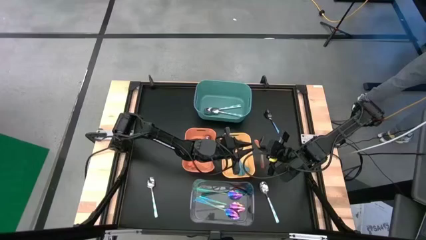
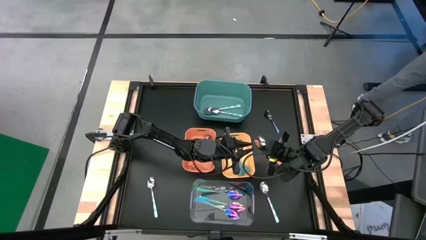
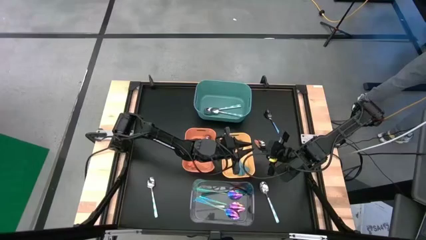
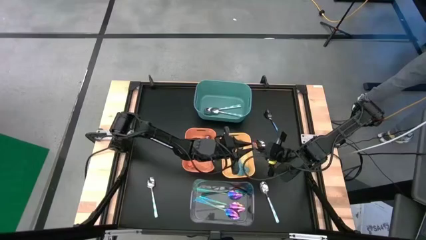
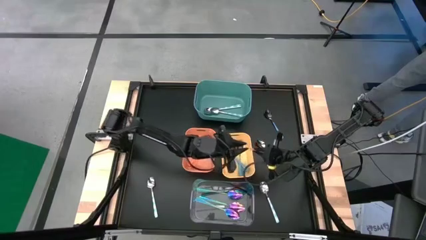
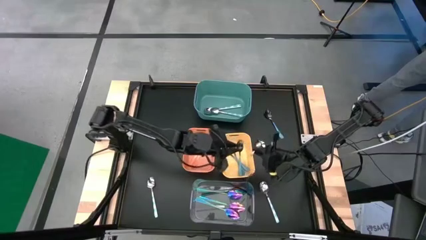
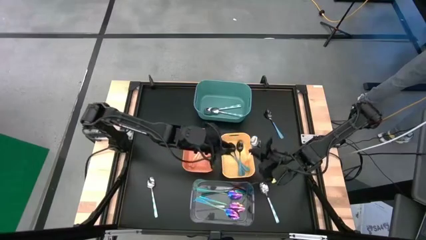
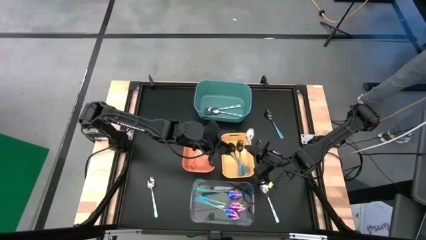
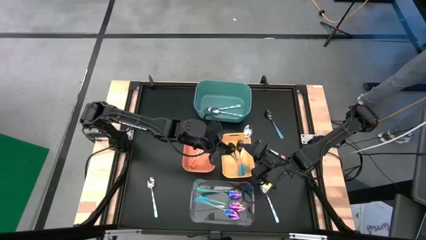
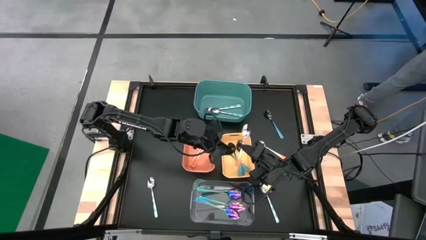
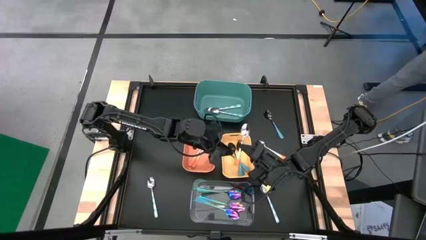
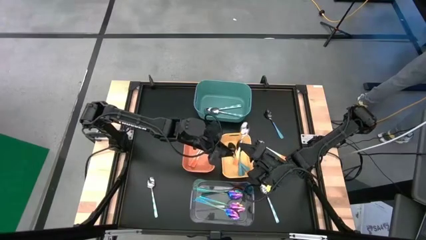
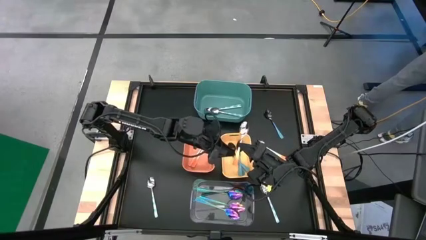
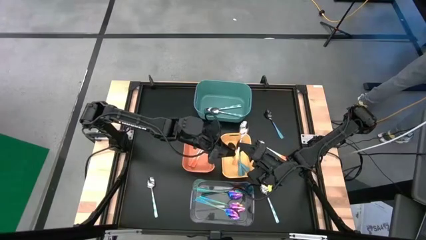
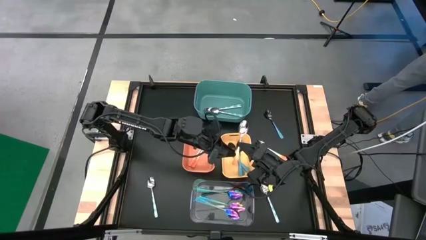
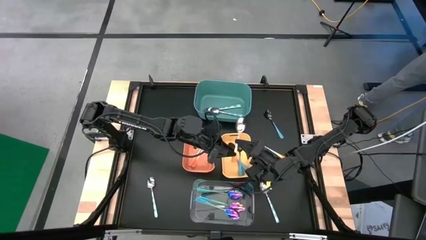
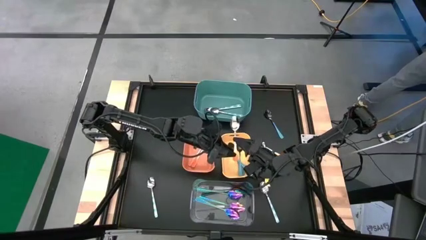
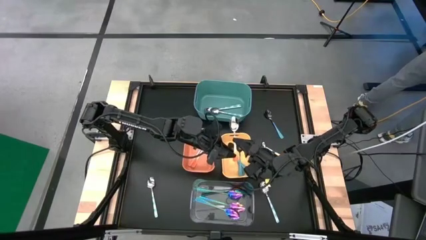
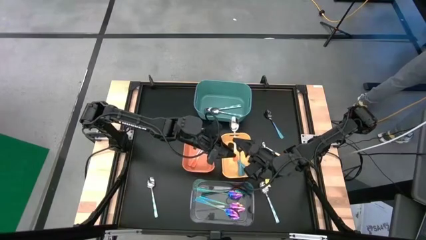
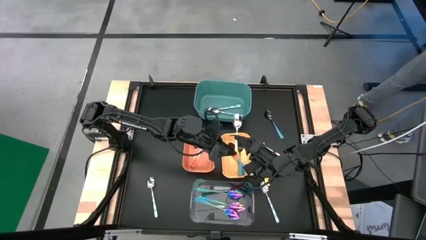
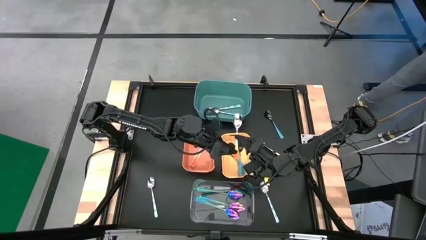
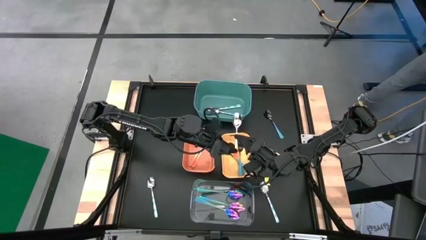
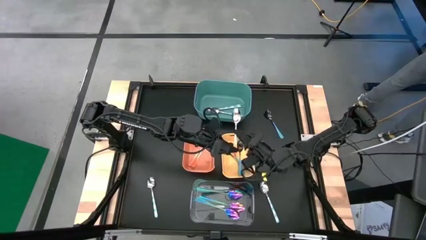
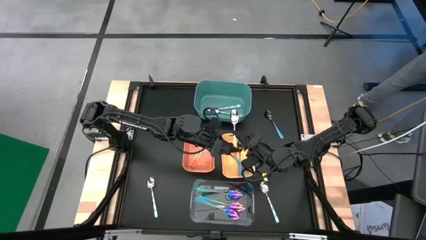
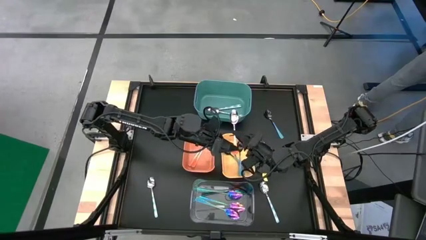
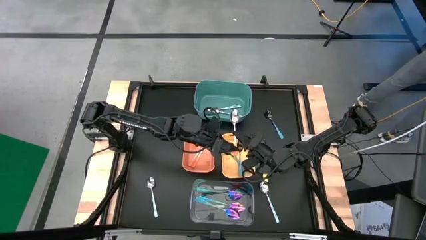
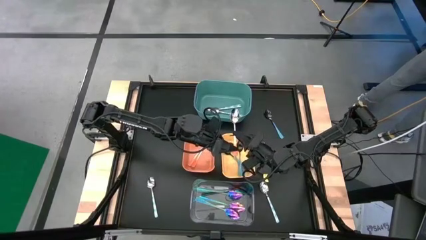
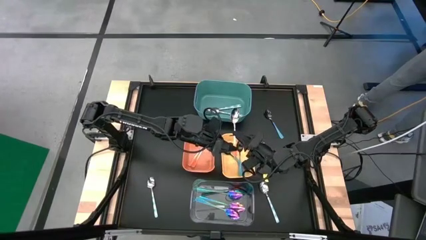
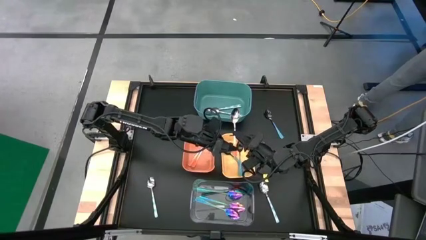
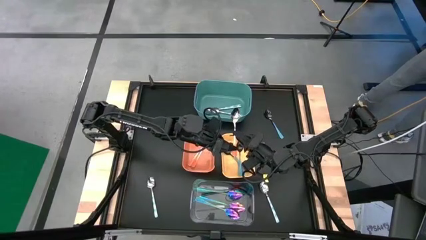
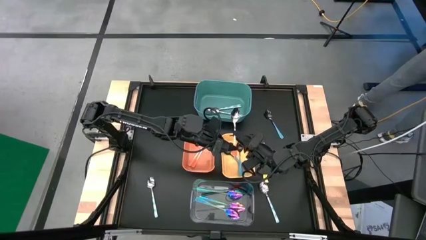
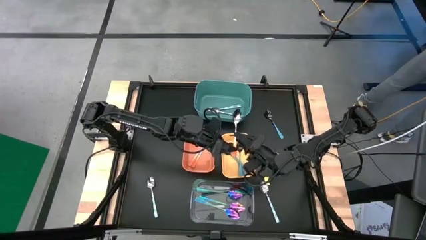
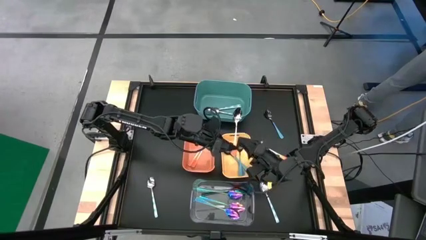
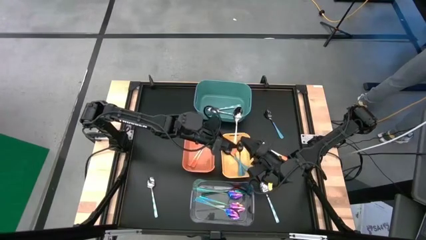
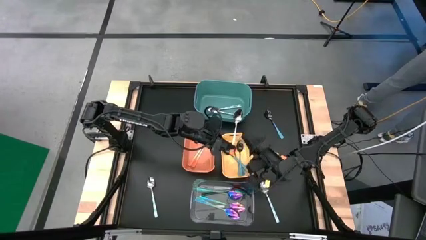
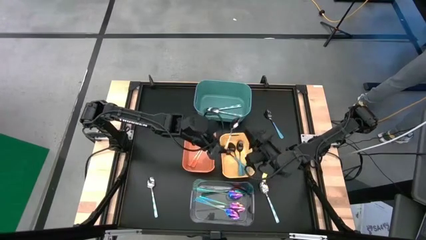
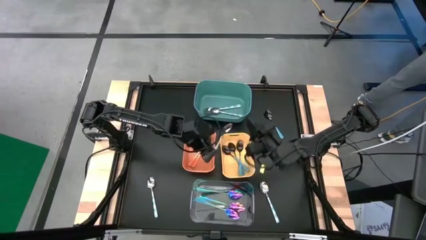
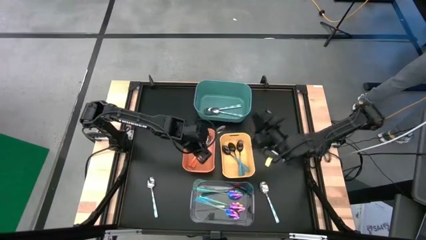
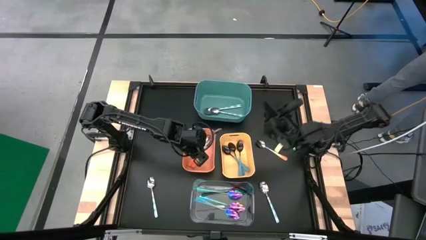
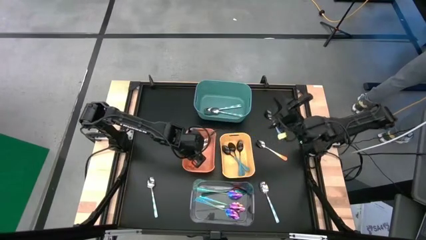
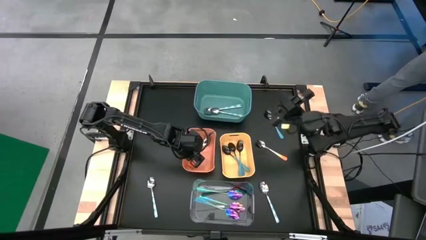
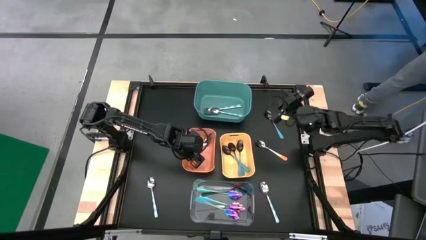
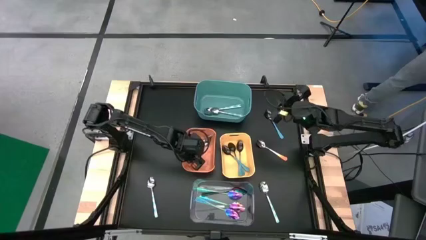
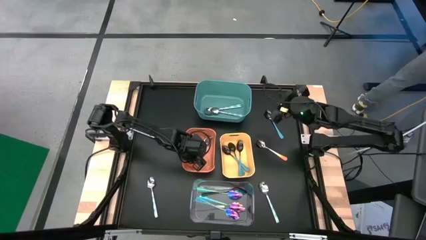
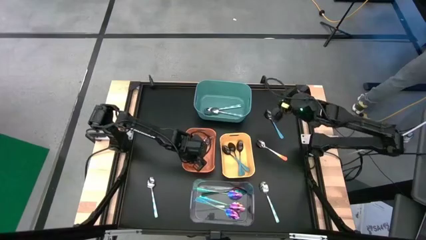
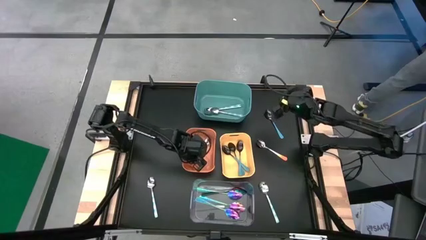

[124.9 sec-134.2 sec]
Task: Sort silverware by color (type)
Put the orange spoon into the orange bin

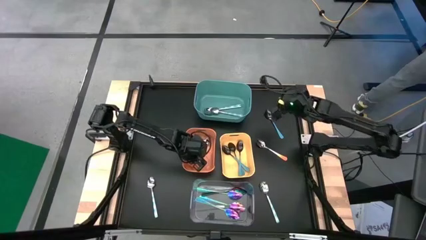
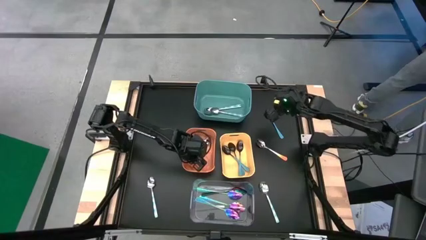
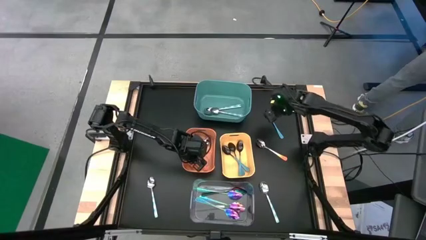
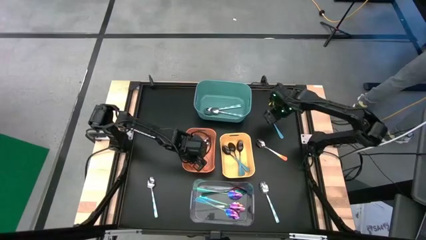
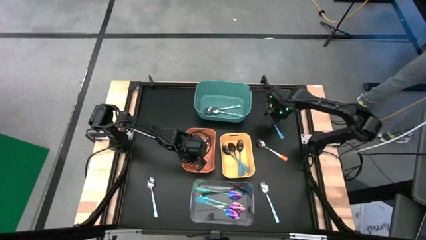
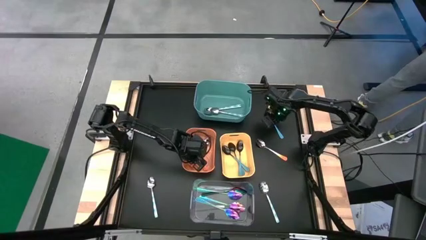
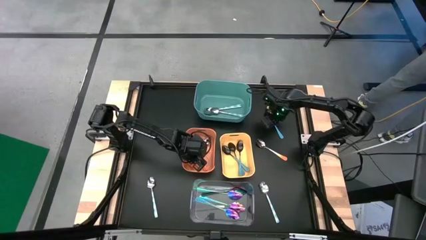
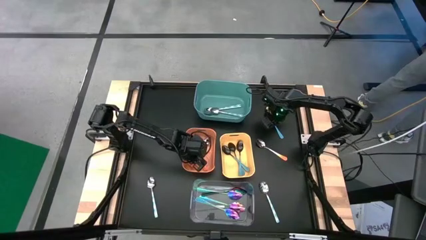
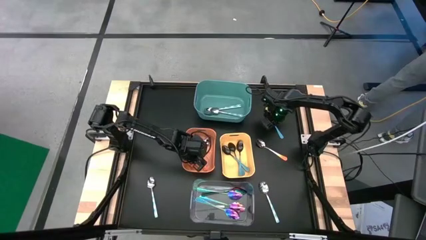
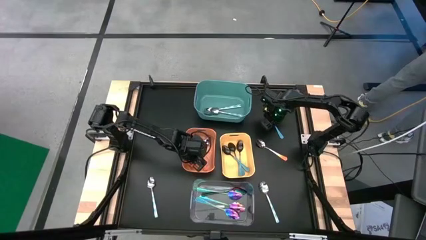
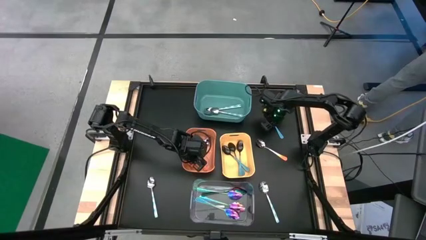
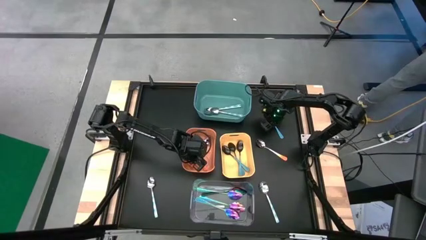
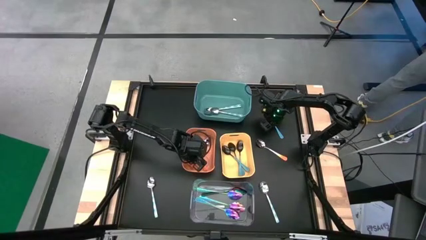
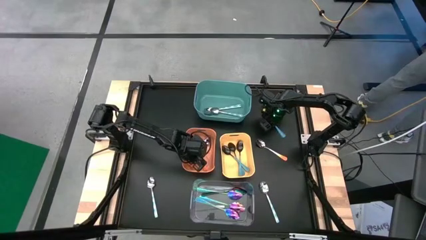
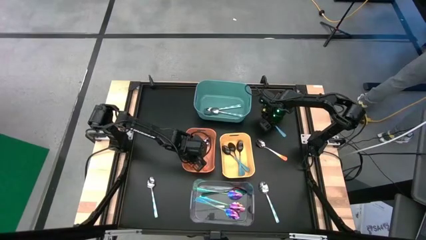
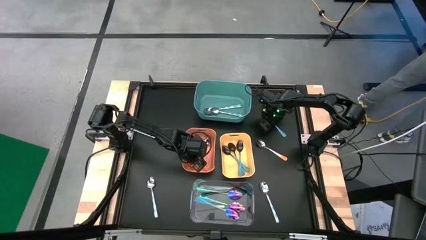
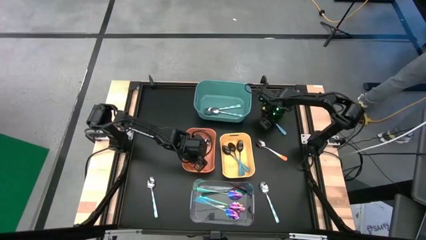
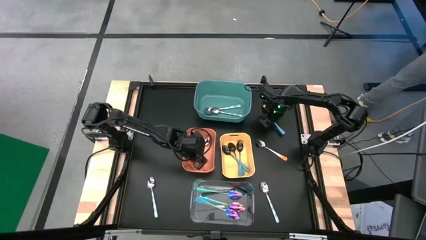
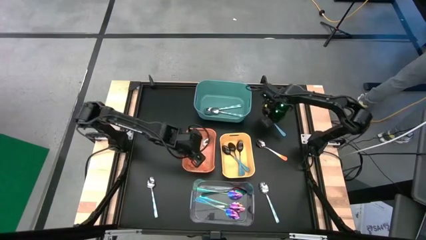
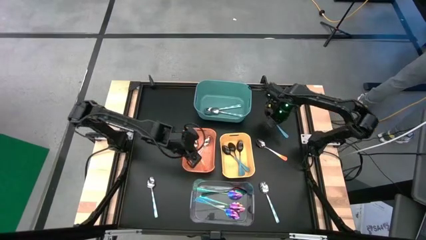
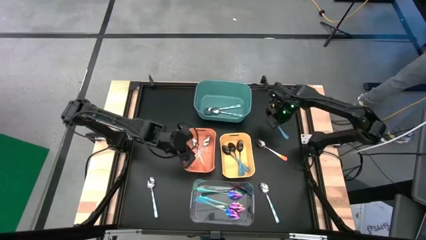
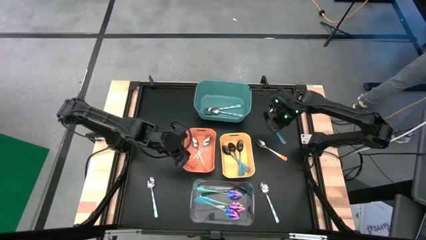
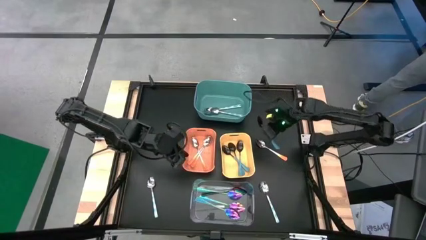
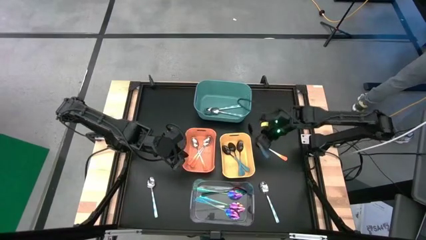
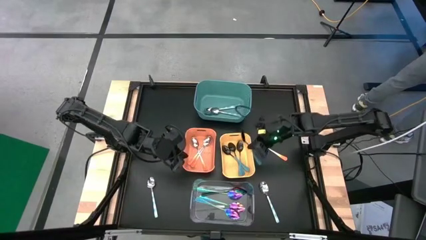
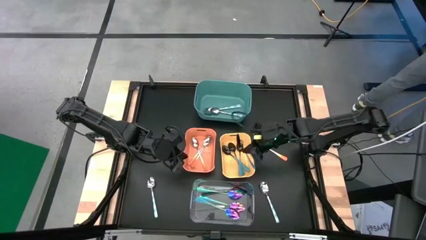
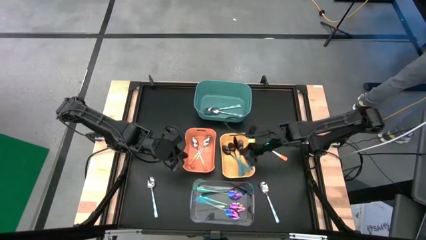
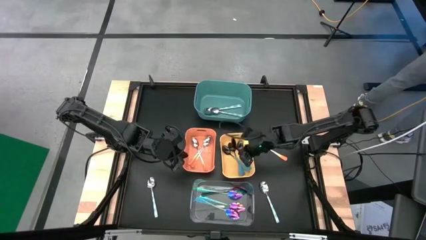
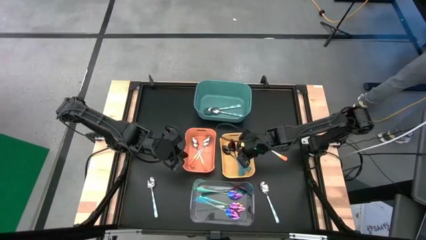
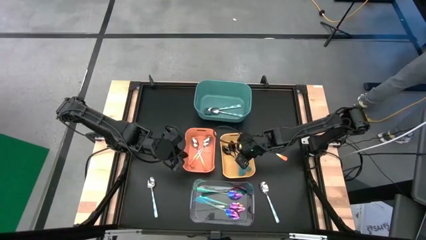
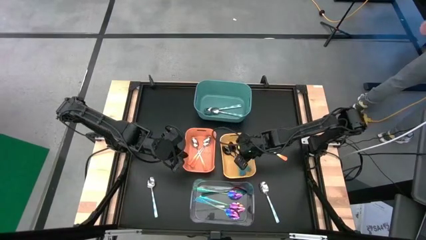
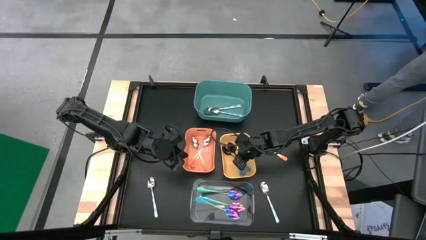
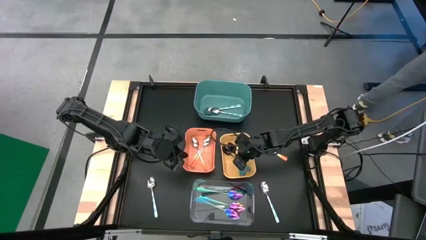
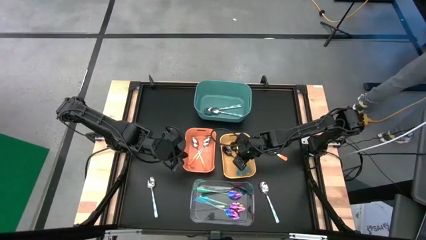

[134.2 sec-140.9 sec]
Put the light blue spoon into the yellow bin
